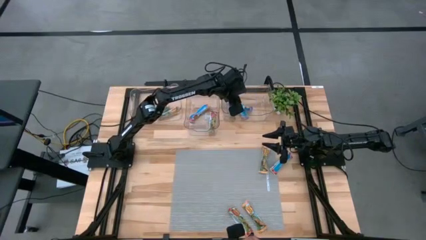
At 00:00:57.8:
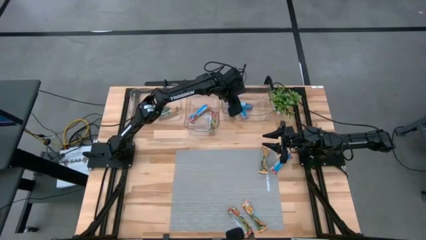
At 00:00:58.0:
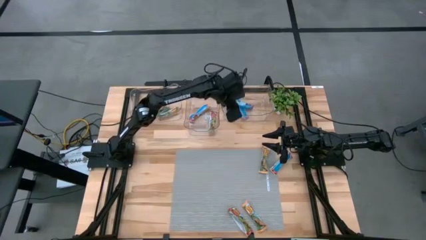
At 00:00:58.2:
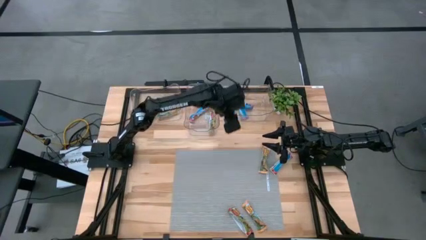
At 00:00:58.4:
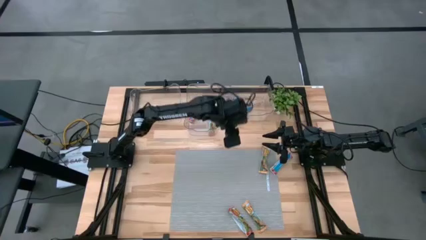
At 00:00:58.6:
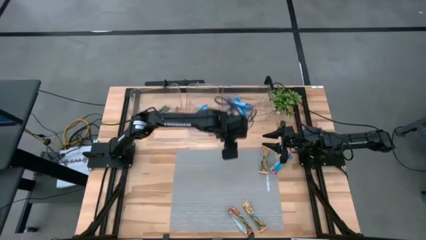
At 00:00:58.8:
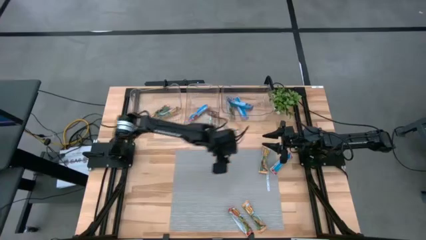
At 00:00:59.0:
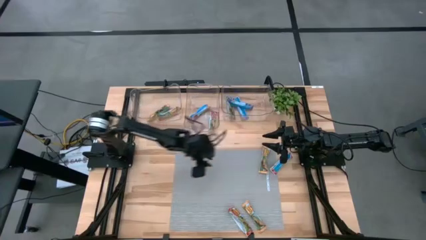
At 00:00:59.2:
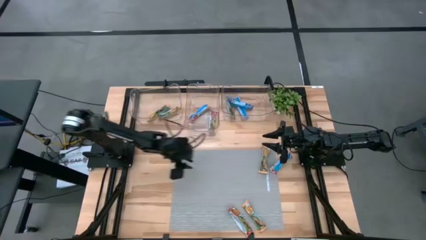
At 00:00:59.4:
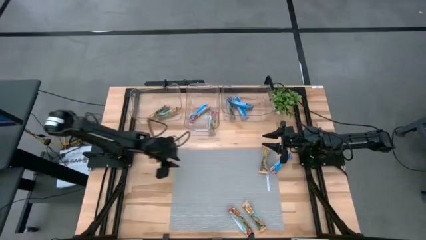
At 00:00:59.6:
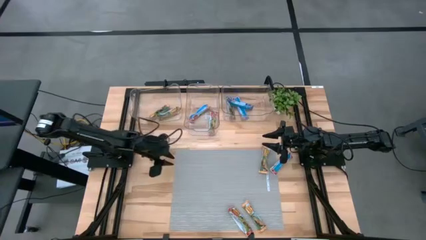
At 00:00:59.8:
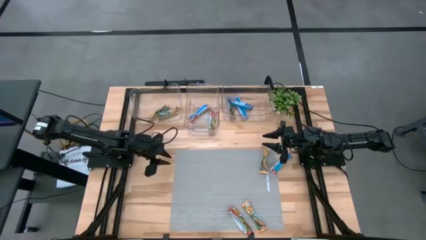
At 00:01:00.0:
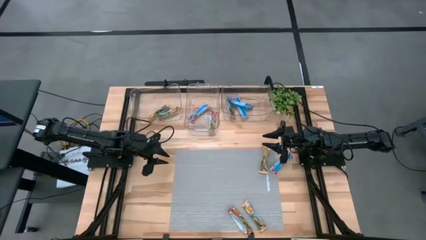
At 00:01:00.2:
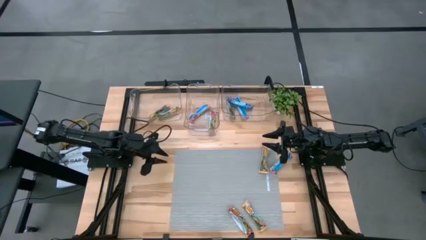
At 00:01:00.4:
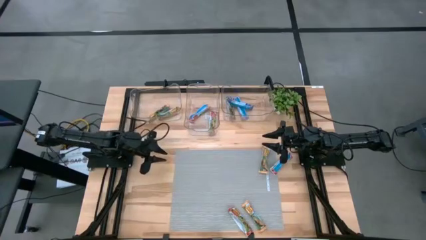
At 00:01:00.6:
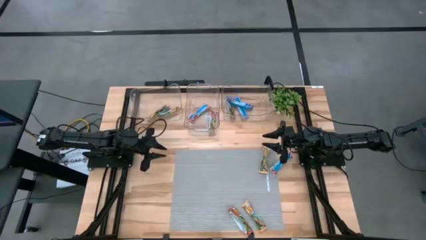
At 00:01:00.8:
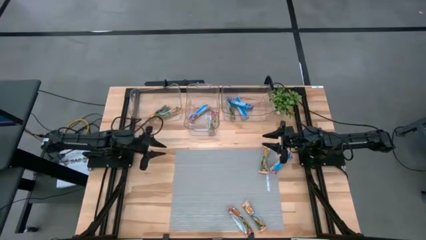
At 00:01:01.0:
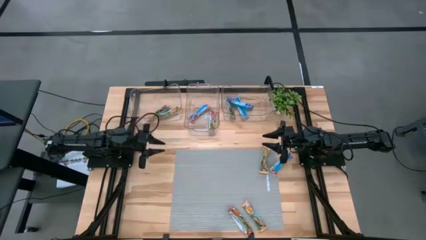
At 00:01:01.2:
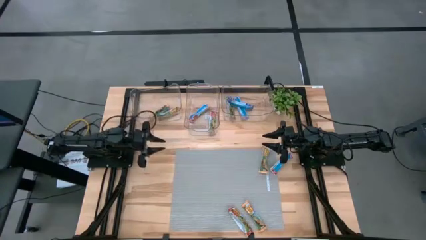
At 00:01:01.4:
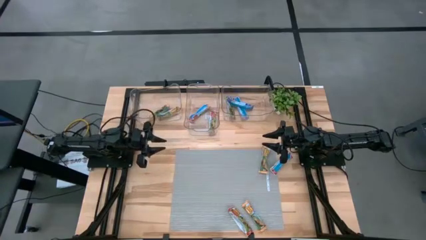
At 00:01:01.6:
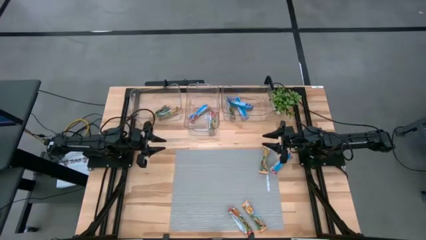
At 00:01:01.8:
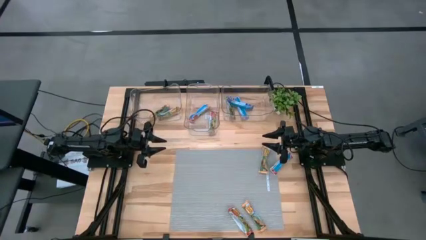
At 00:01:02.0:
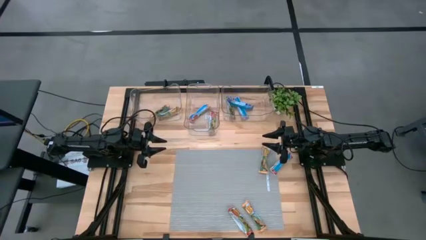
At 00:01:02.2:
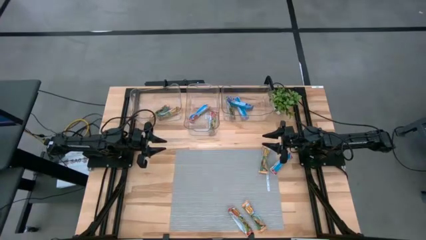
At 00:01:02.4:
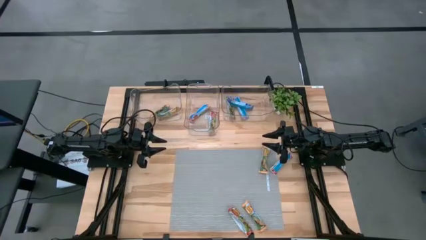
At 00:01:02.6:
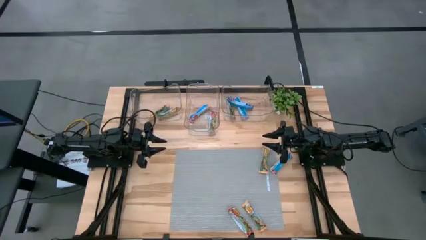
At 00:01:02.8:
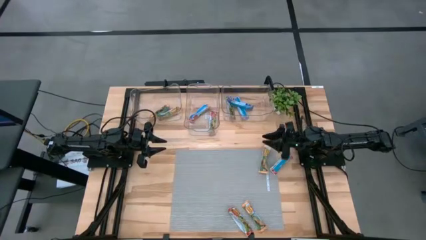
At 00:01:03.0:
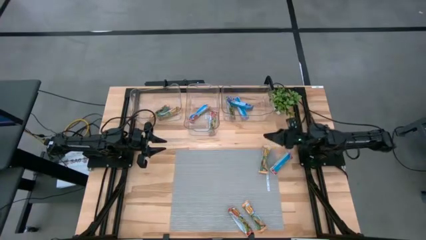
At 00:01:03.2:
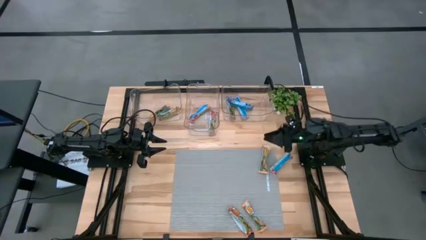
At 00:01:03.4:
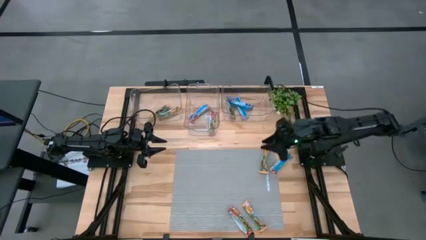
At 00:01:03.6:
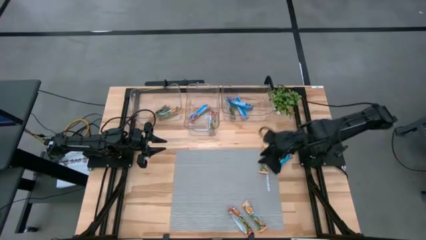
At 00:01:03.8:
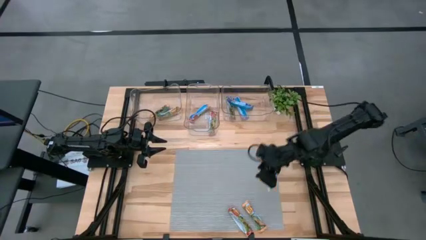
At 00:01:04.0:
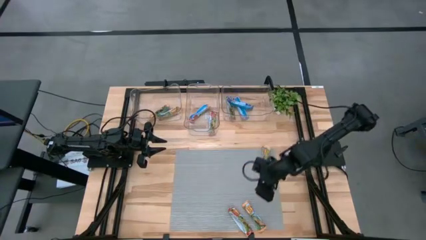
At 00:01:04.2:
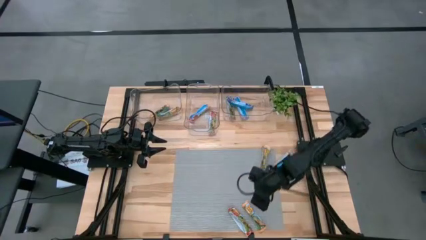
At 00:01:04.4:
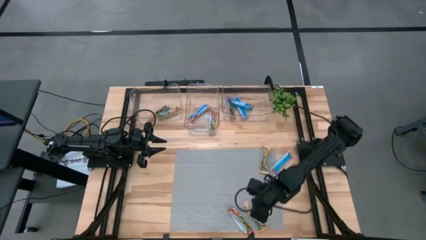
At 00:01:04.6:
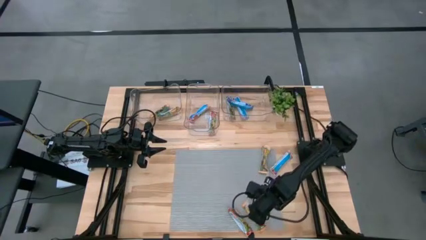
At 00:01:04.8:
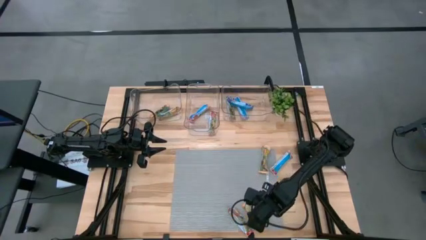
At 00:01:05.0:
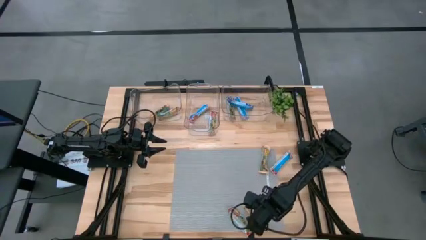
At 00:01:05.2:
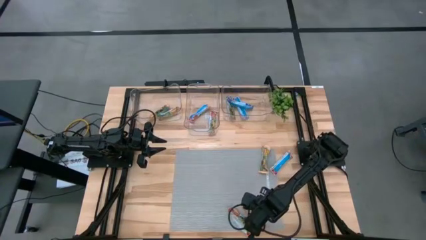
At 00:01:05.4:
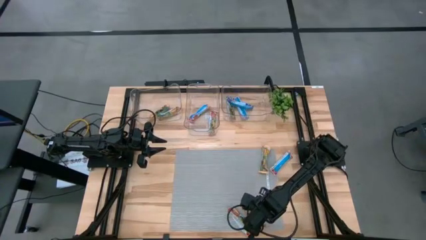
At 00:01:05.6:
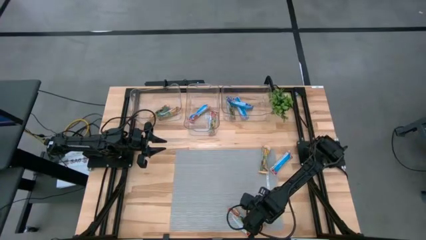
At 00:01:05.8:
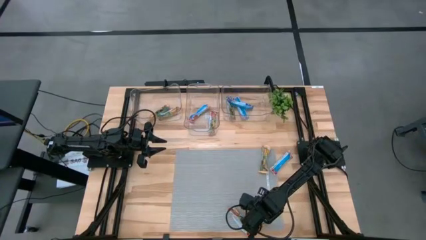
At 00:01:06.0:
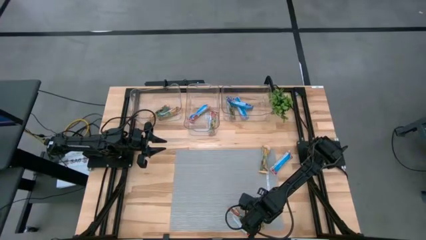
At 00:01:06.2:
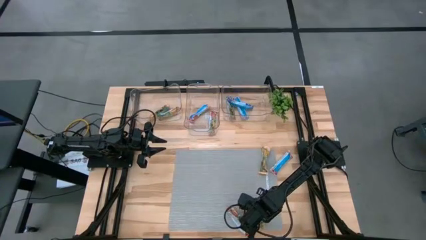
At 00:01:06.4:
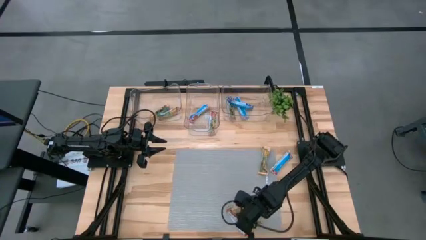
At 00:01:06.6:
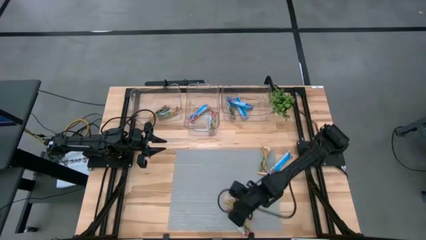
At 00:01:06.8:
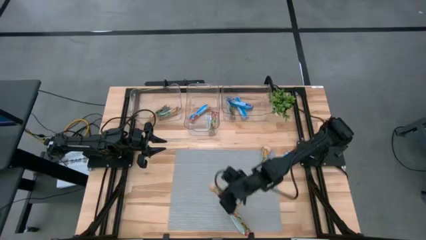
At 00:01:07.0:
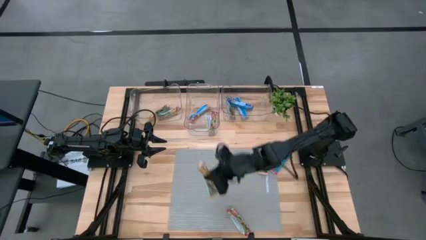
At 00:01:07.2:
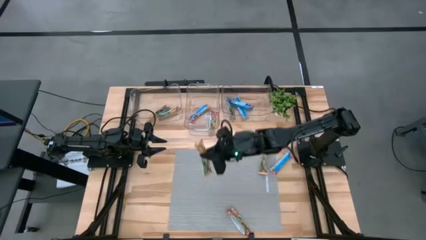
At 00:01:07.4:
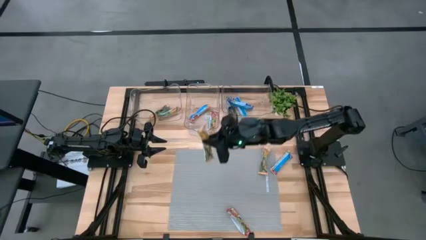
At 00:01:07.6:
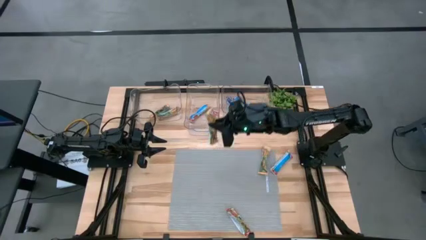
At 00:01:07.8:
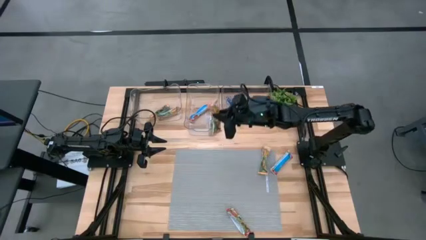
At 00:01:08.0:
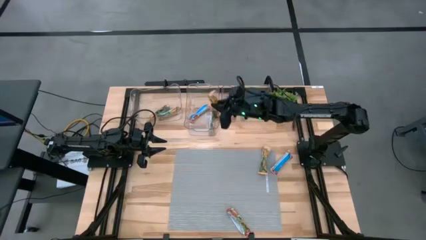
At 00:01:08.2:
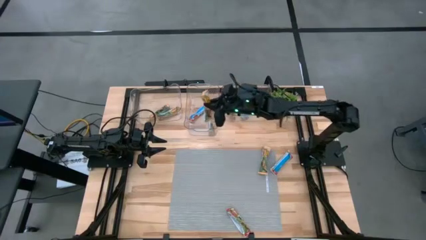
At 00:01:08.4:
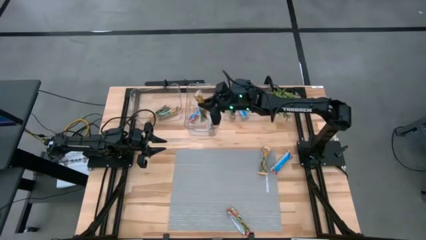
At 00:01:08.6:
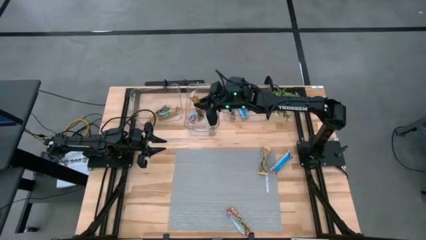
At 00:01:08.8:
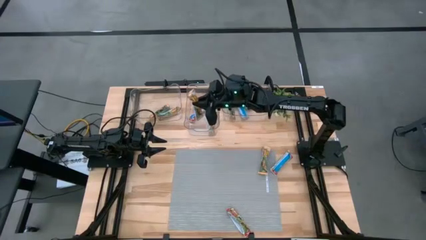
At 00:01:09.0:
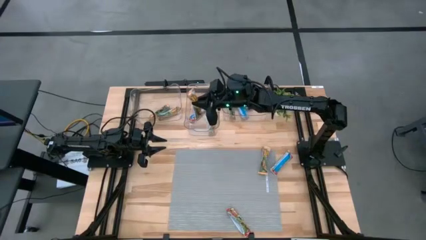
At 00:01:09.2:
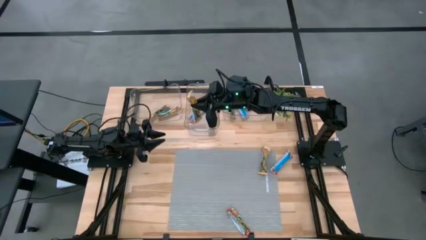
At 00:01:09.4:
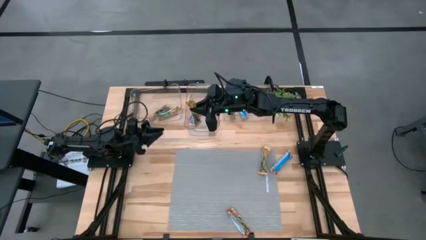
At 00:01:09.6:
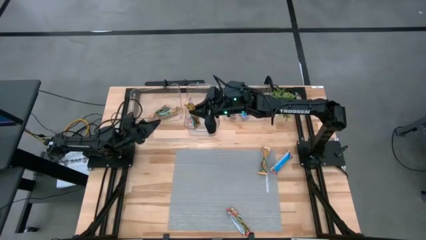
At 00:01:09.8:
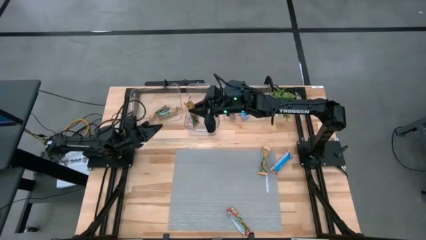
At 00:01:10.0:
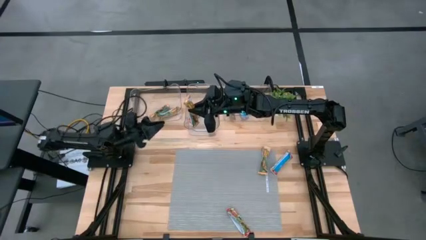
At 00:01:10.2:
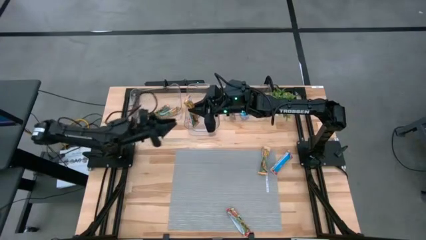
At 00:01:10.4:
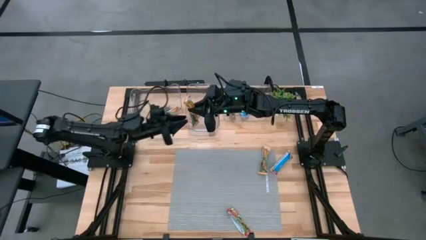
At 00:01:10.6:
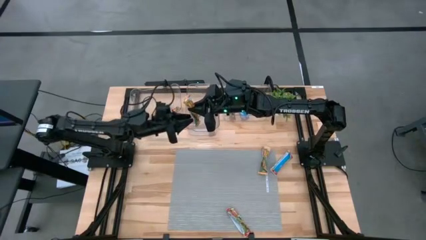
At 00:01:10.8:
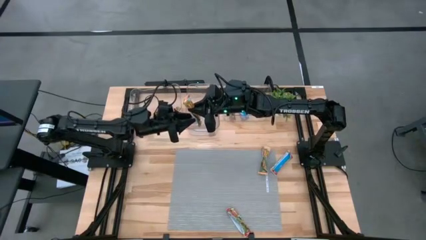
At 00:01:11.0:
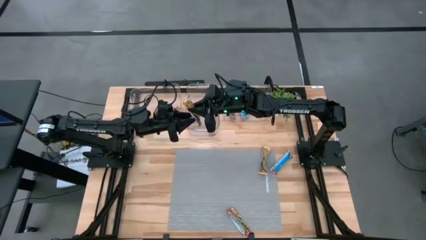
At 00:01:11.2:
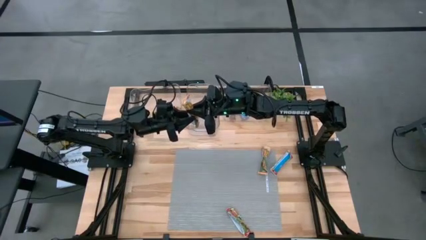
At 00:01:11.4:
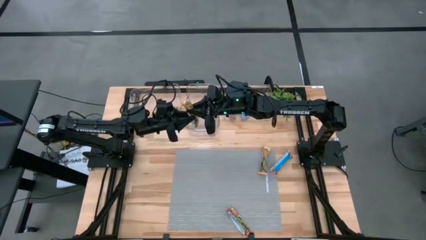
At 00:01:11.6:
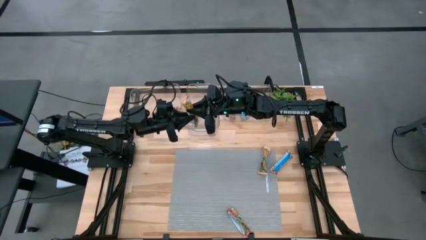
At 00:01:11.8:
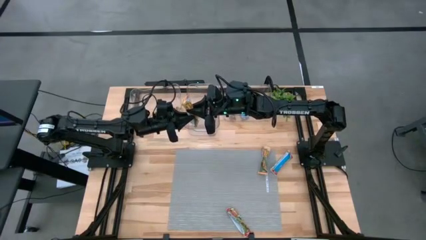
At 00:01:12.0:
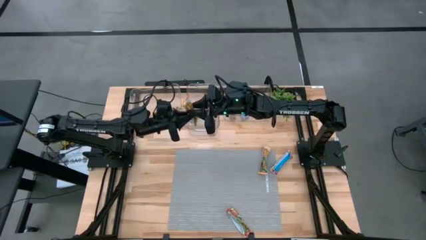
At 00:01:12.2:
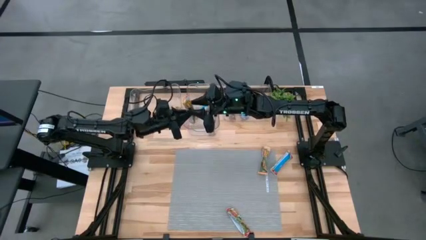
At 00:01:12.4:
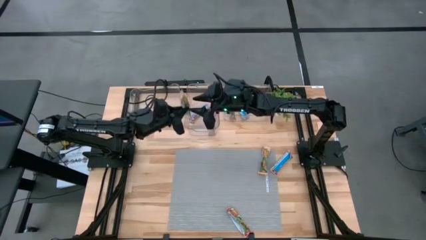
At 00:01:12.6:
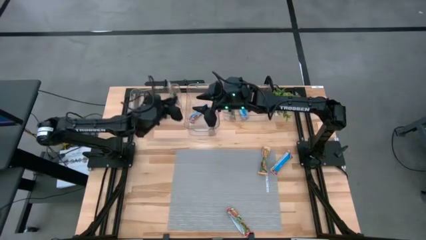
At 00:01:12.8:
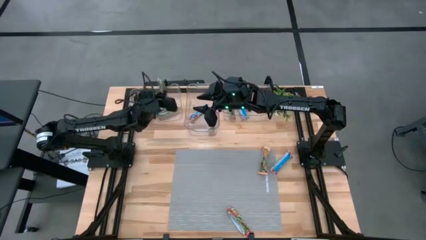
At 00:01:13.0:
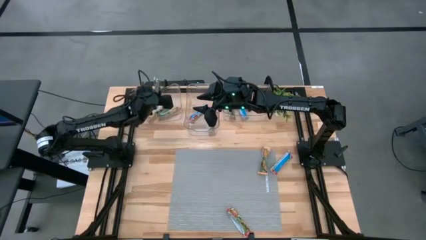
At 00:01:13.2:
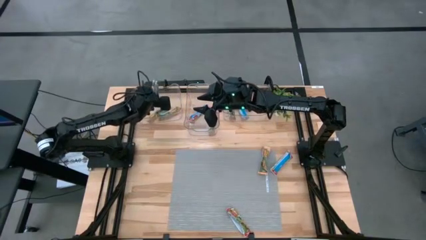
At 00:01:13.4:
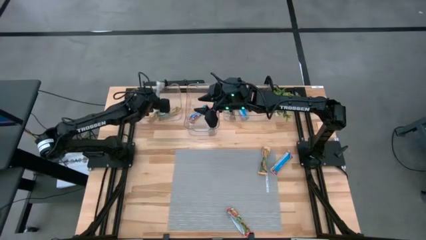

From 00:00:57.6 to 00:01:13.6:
Task: Pick and place Granola Bars by type
Put the yellow granola bar into the left transparent bin
